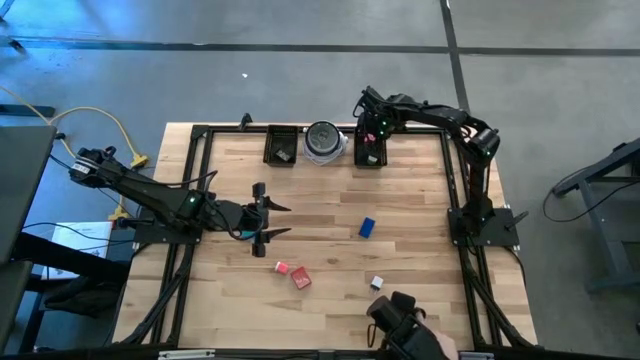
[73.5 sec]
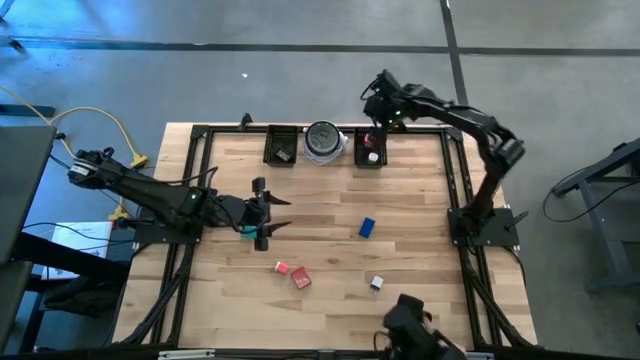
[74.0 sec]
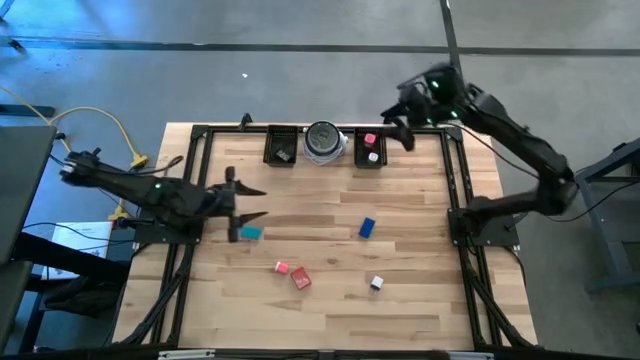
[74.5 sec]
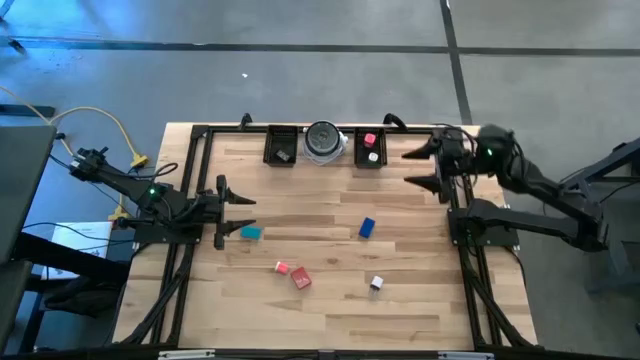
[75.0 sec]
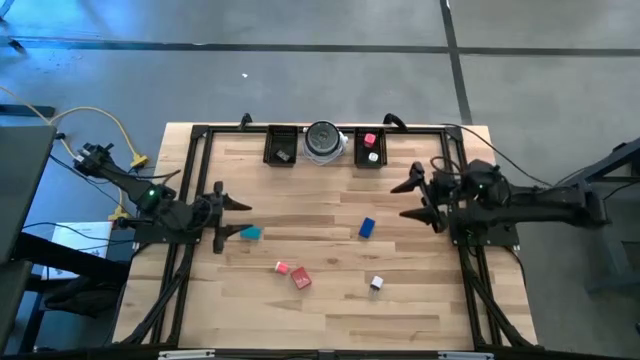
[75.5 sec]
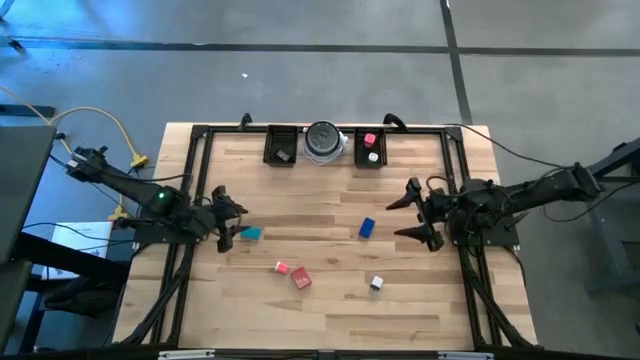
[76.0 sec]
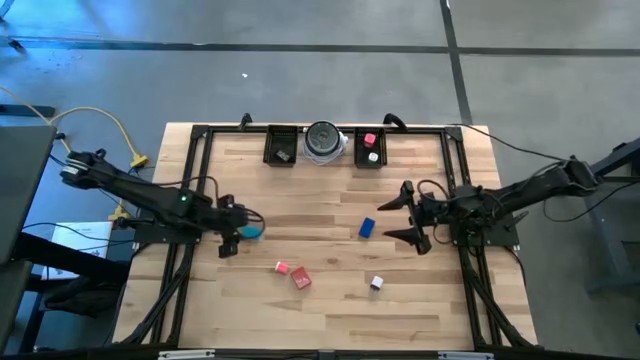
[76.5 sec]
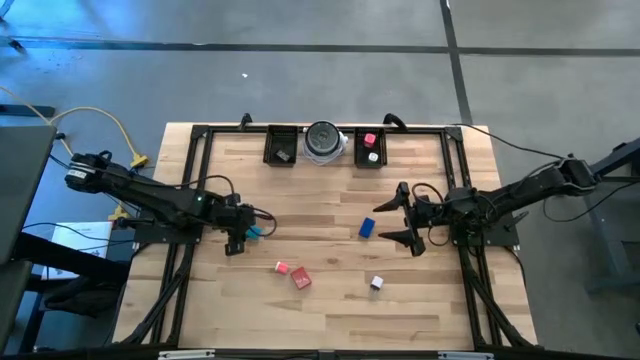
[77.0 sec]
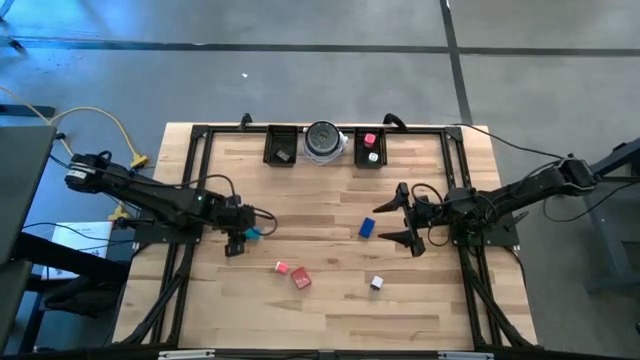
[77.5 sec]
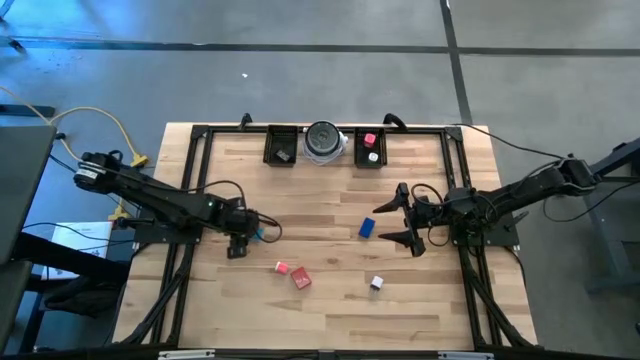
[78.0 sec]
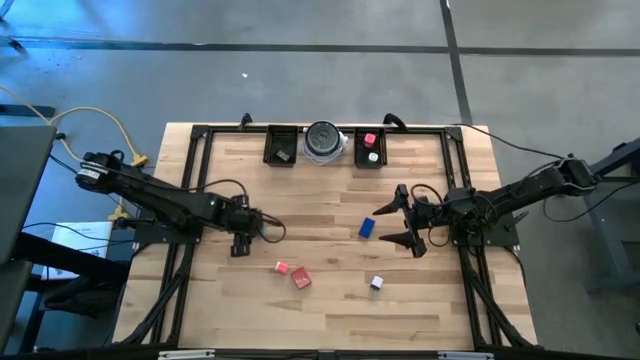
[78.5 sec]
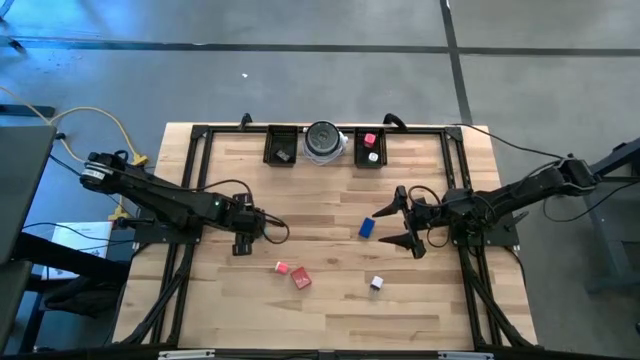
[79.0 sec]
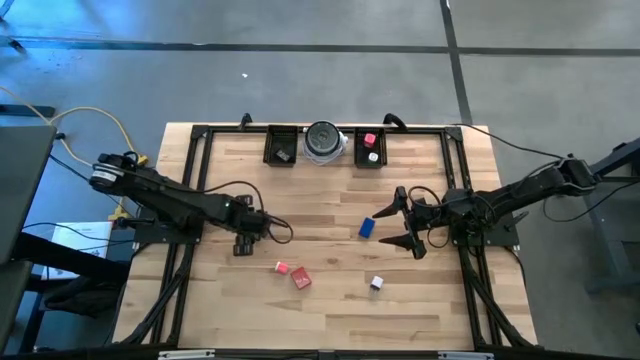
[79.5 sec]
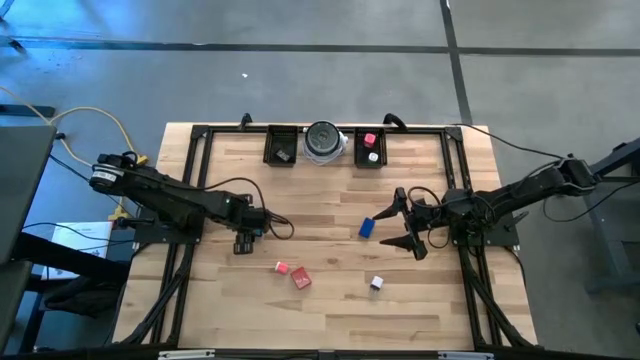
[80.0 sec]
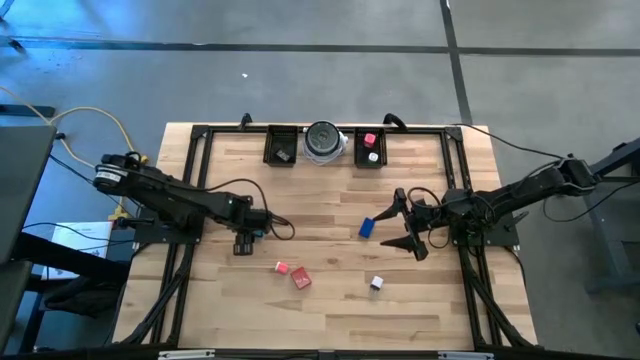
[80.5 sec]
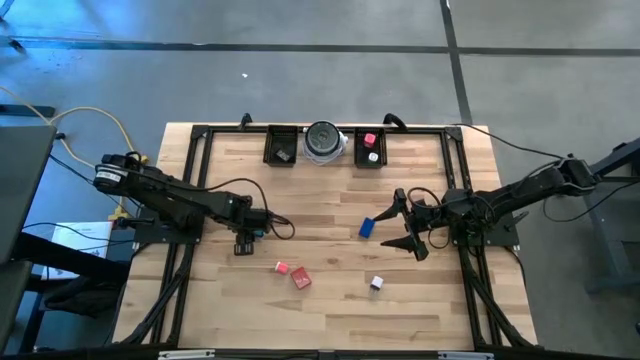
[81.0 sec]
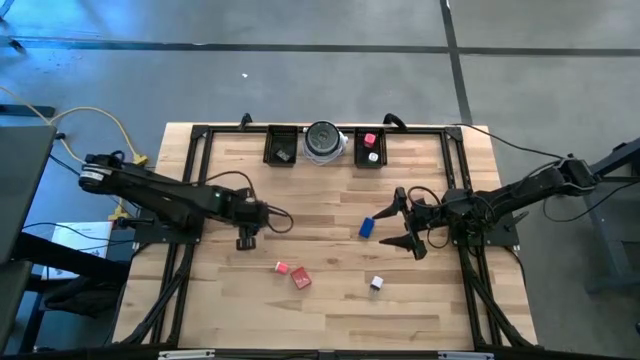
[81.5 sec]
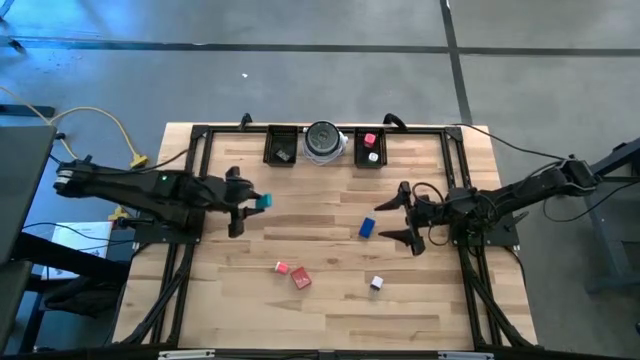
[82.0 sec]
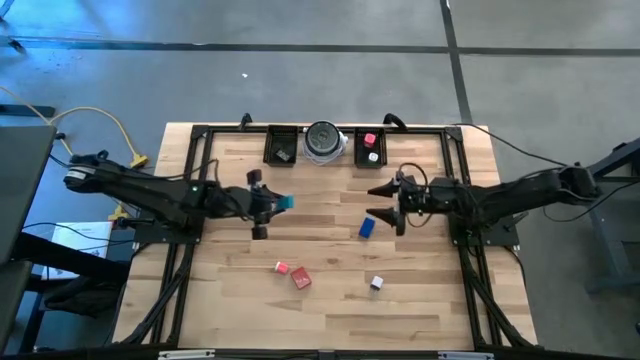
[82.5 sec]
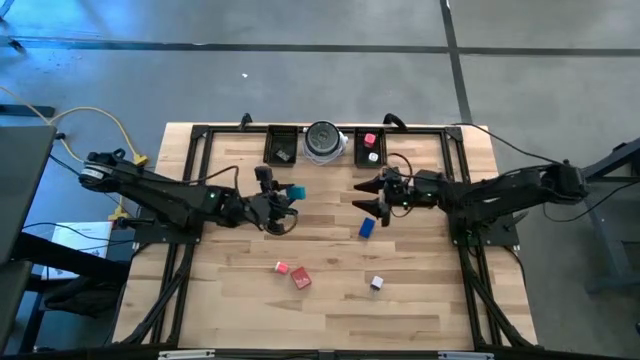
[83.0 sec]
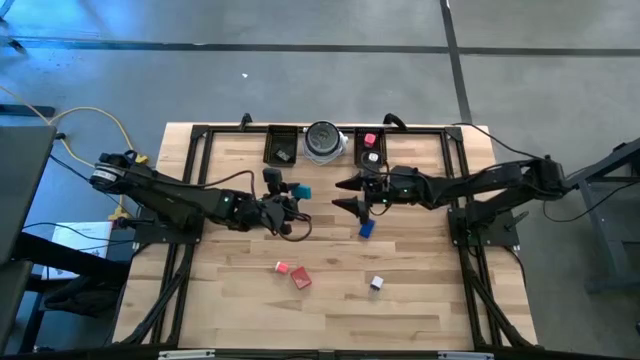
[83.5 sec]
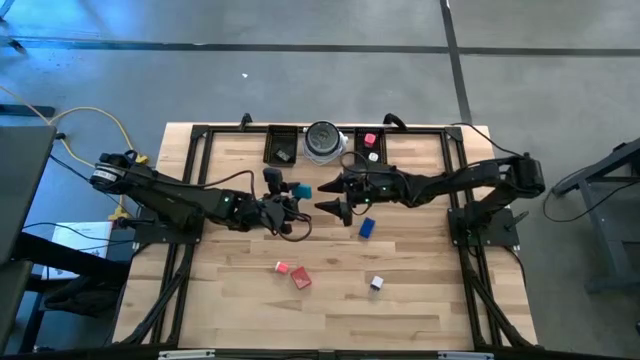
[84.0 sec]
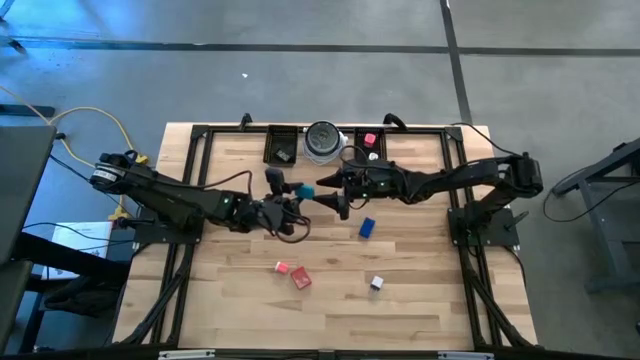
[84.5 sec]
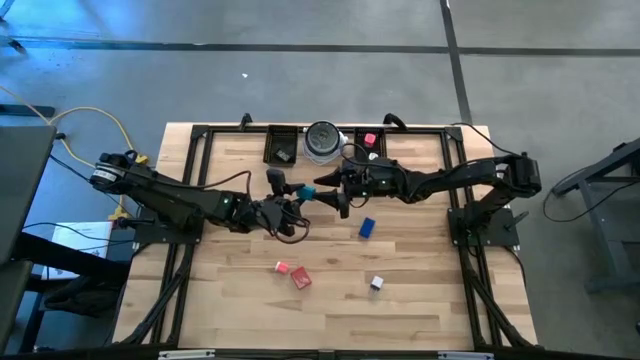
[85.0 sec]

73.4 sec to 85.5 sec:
Task: Pick & Place Office items
Put the light blue timer into the left black basket

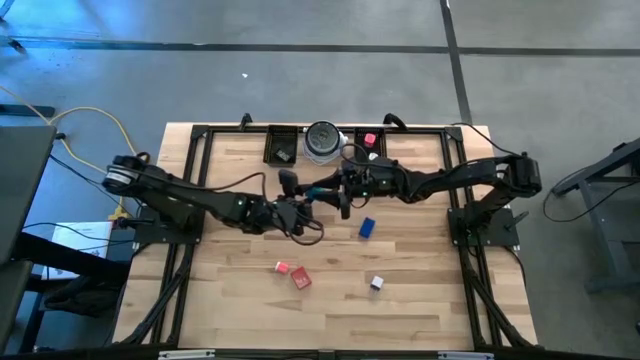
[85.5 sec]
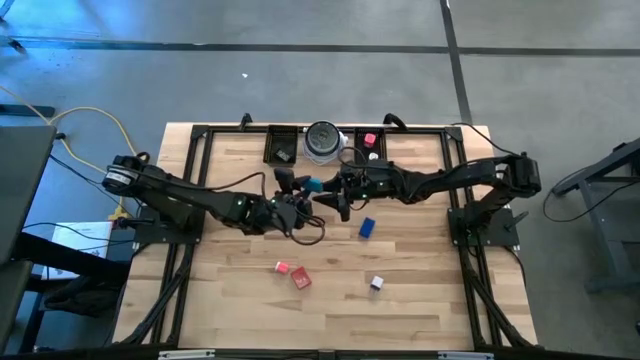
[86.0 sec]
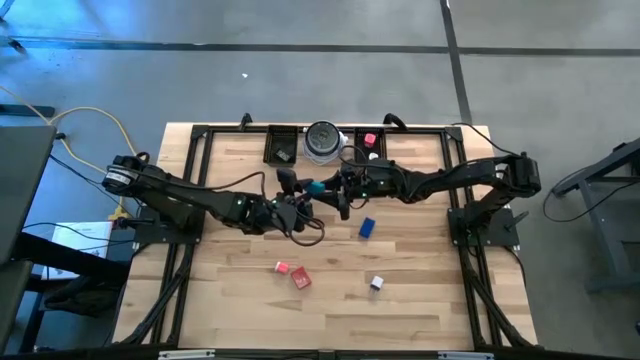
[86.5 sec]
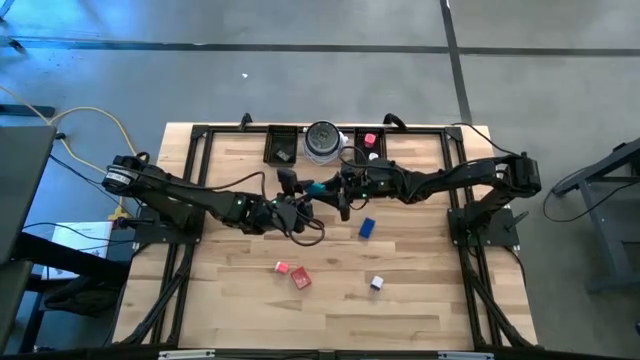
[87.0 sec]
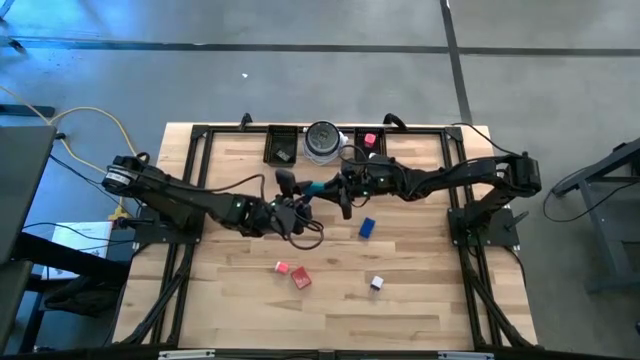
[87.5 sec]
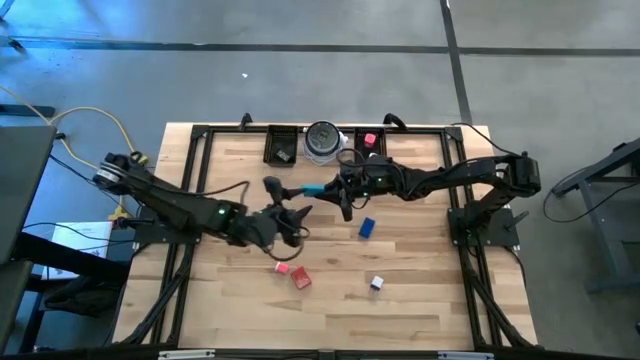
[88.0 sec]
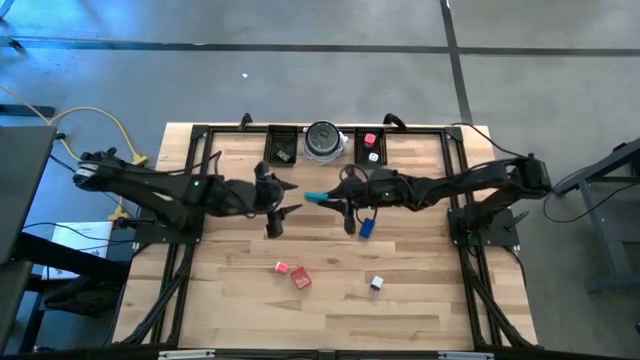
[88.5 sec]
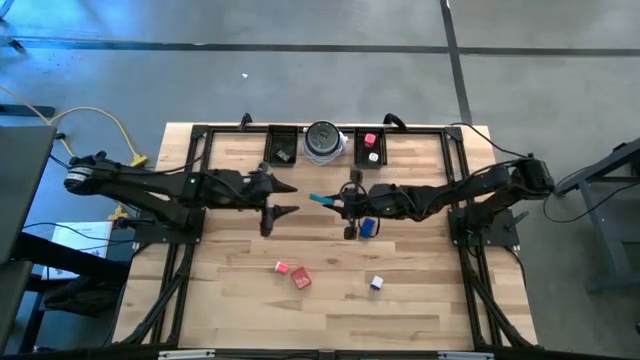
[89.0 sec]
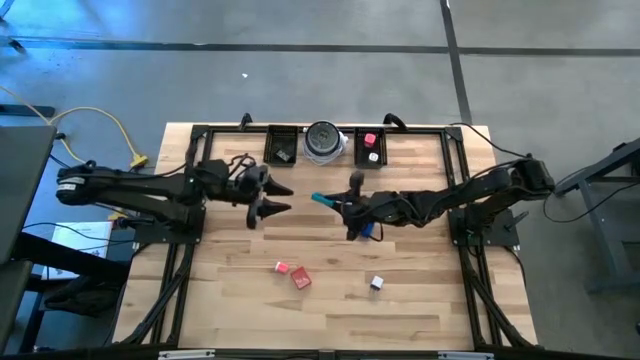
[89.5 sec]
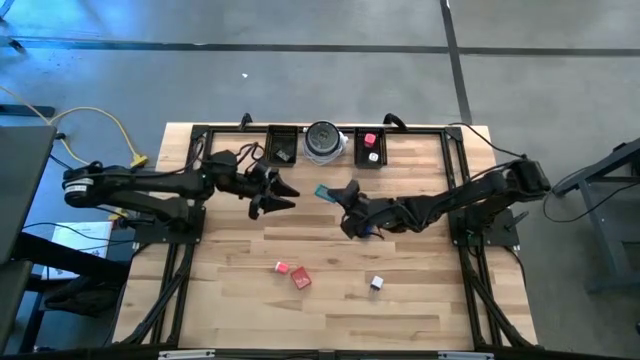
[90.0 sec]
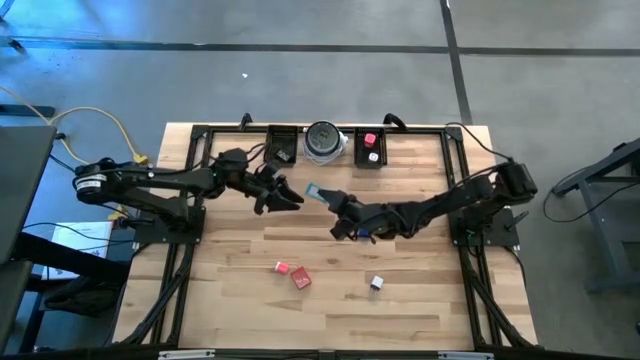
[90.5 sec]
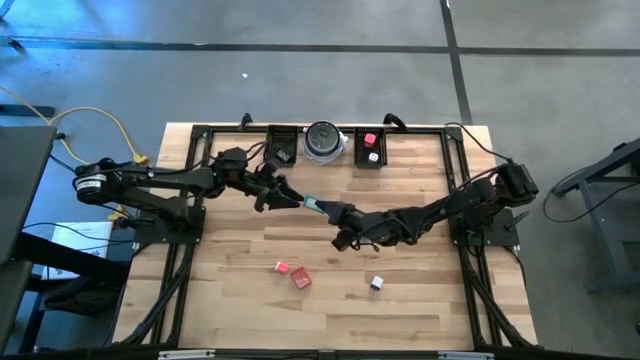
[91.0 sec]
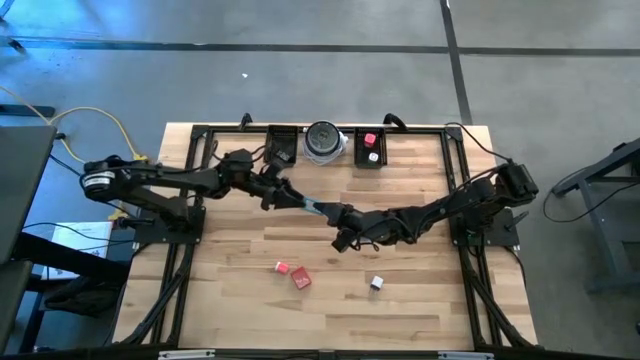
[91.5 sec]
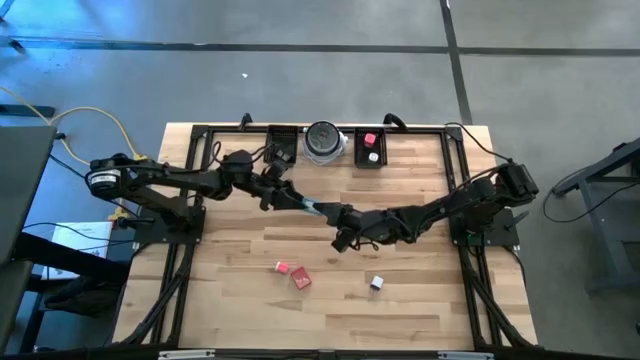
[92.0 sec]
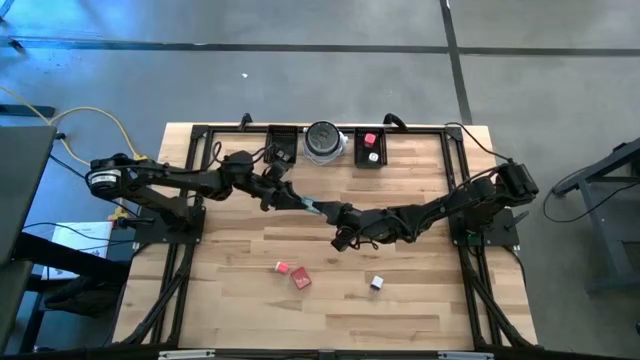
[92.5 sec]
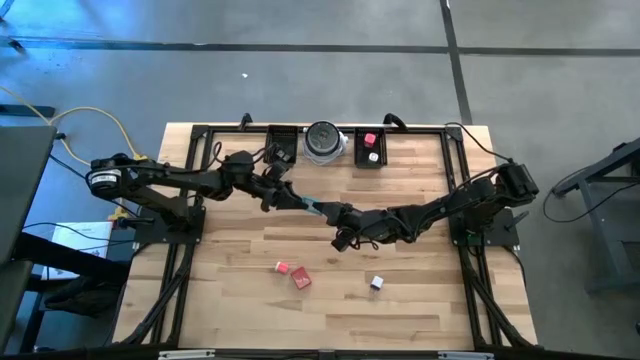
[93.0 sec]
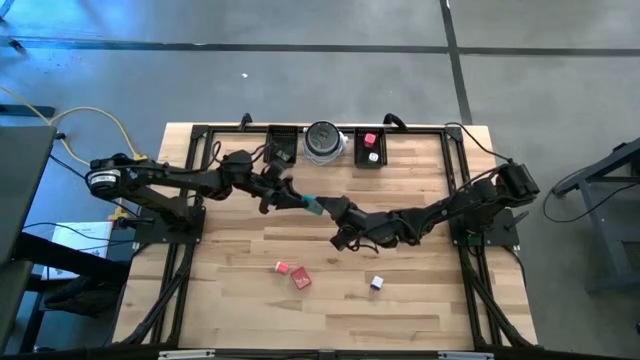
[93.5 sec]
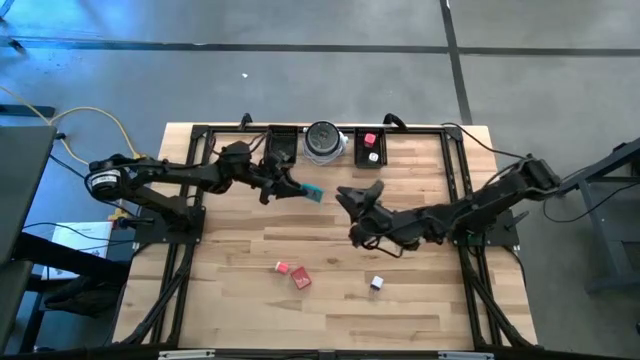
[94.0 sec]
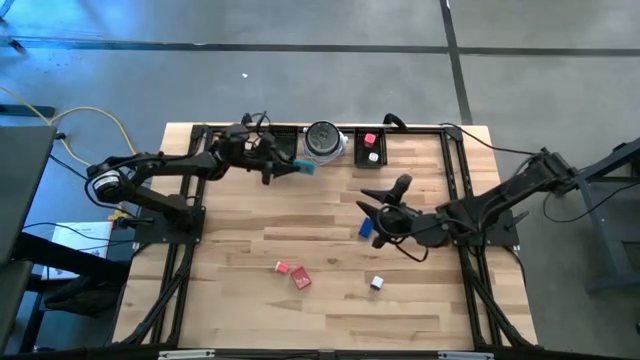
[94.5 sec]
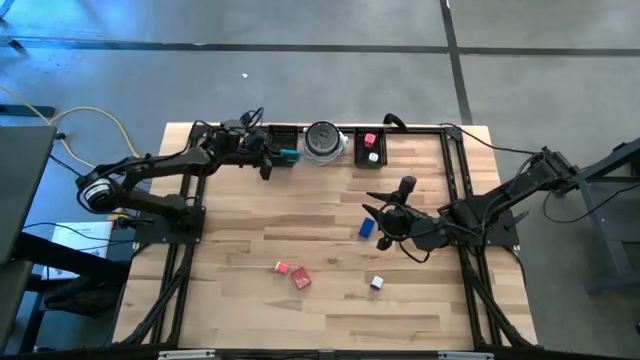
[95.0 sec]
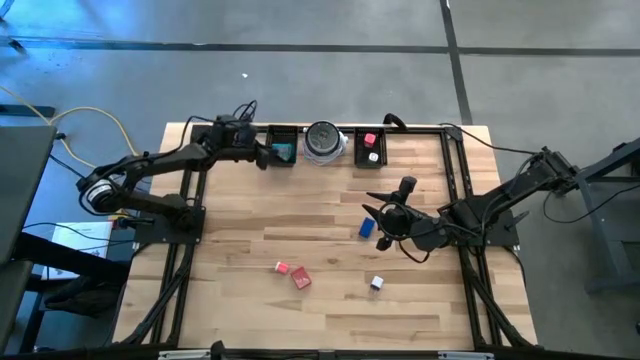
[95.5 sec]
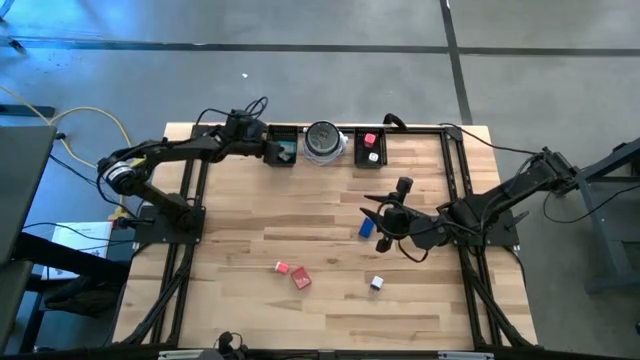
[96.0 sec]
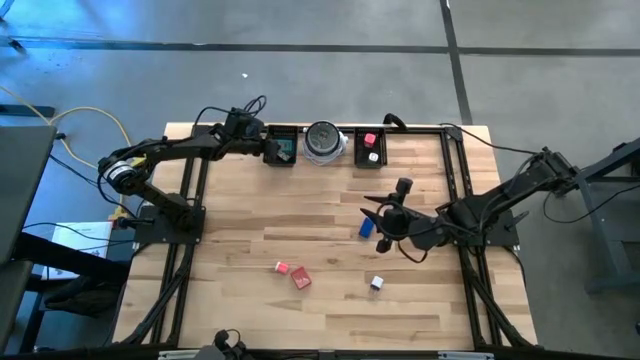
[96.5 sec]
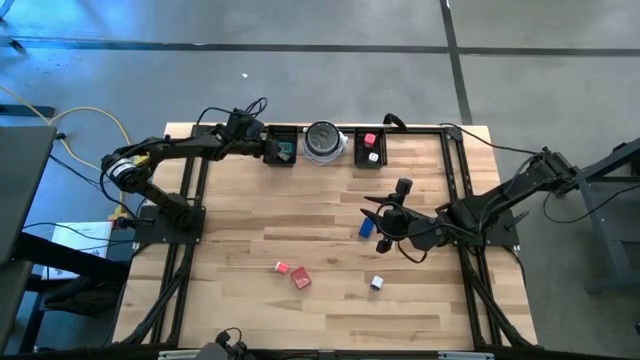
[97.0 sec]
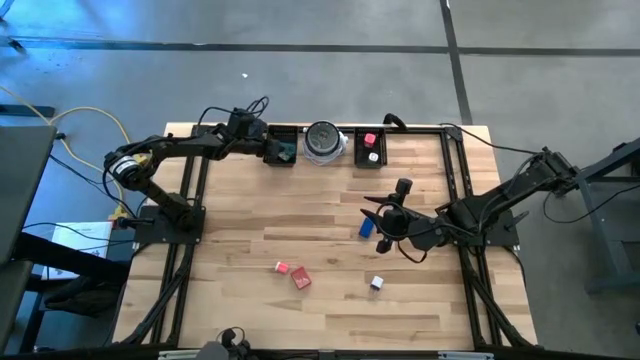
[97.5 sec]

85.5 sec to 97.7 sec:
Put the light blue timer into the left black basket
